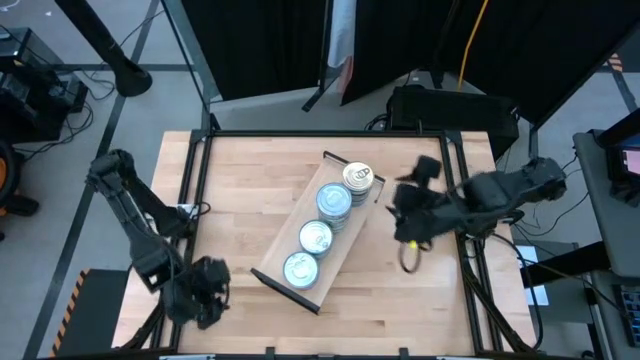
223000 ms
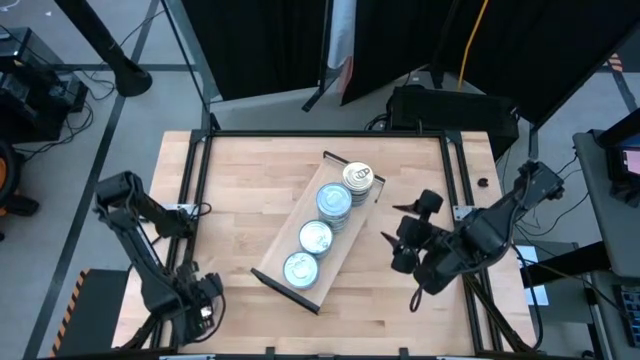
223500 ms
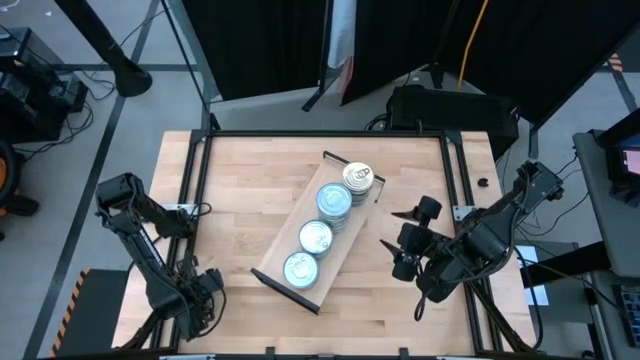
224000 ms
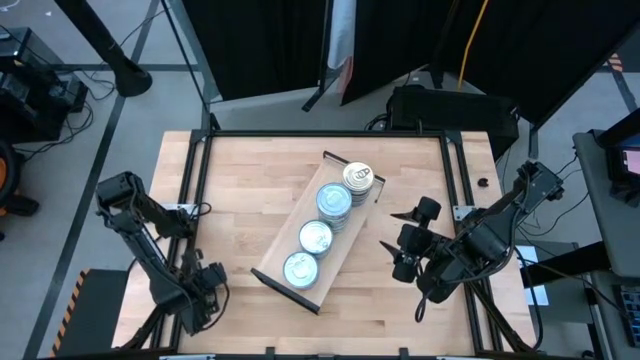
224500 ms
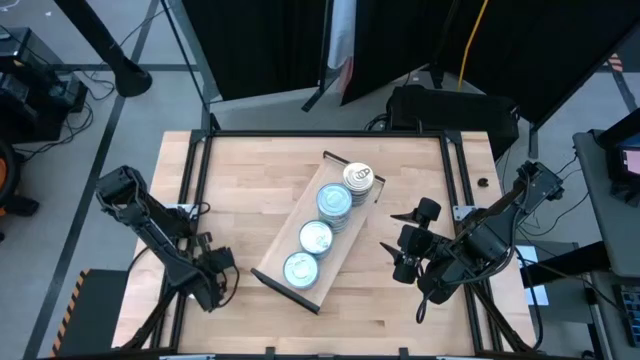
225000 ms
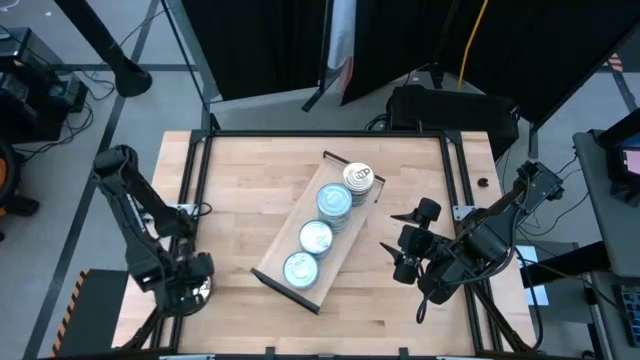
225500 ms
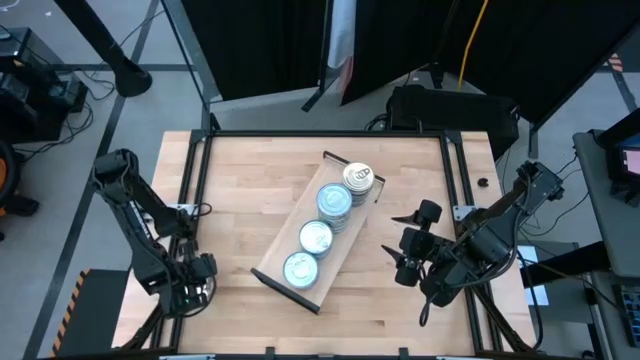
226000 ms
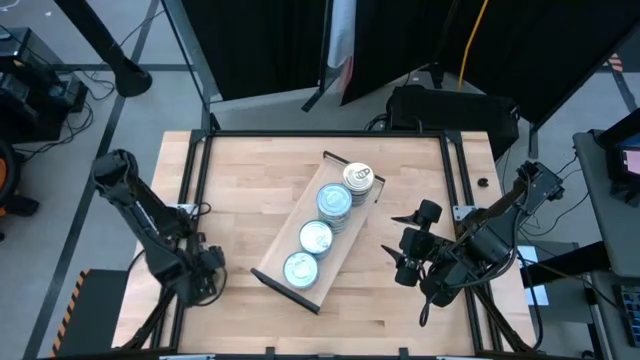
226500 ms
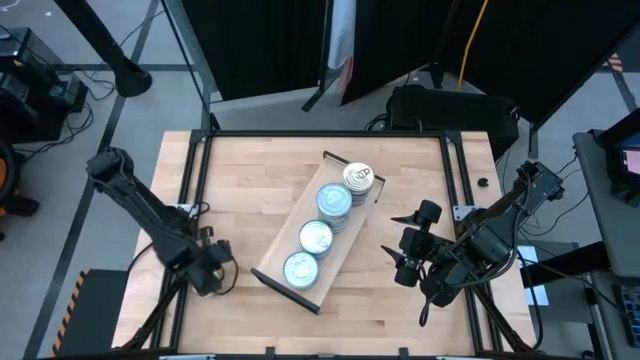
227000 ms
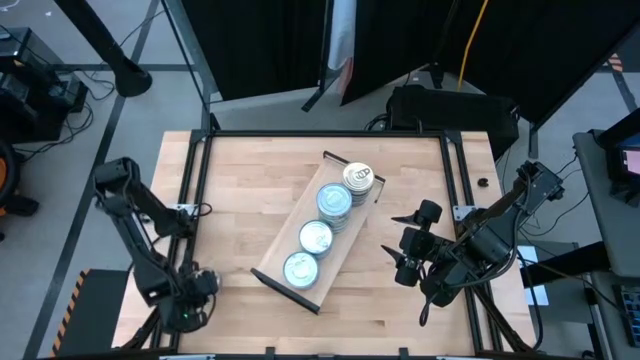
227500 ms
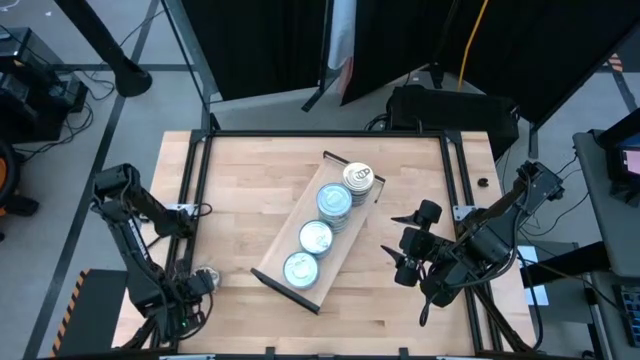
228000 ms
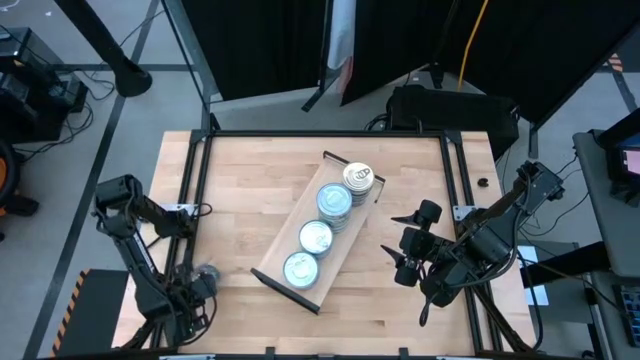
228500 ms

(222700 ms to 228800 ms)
Task: Stack canned seafood by type on shelf
Stack the blue-pink tuna can on top of the other blue-pink tuna can

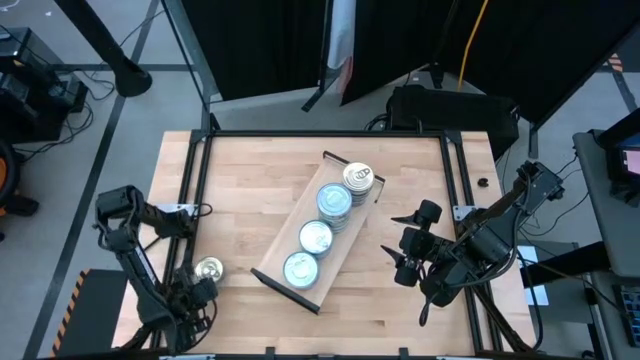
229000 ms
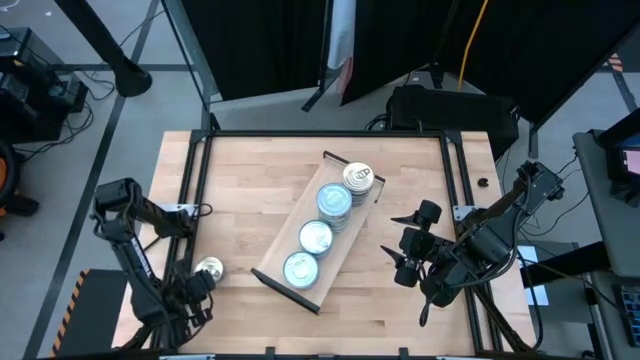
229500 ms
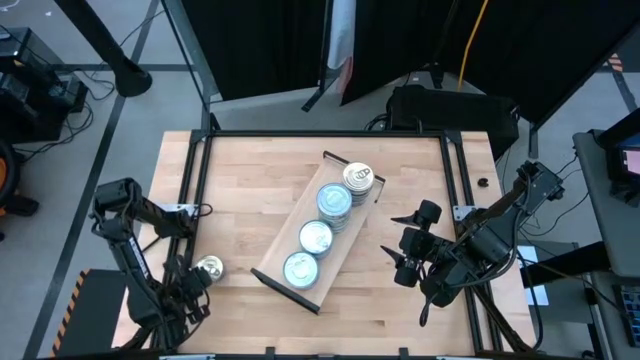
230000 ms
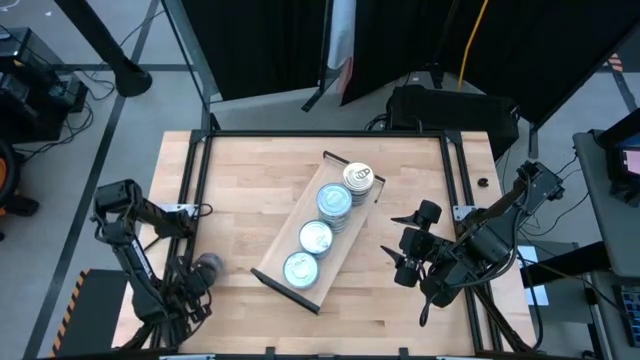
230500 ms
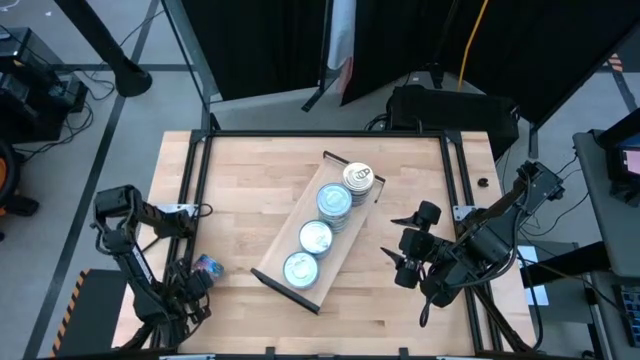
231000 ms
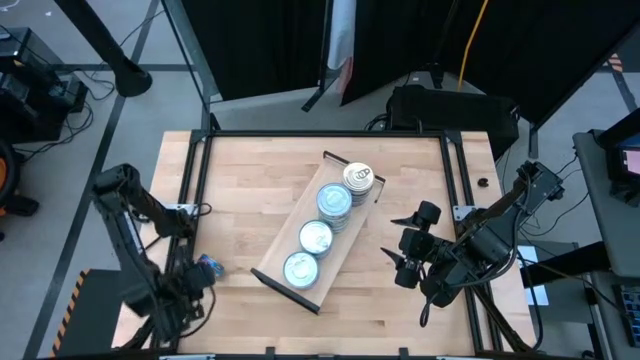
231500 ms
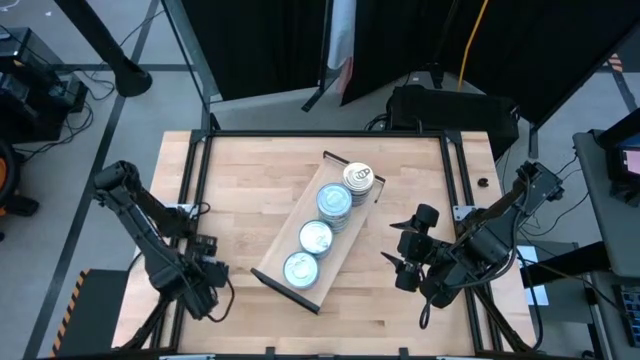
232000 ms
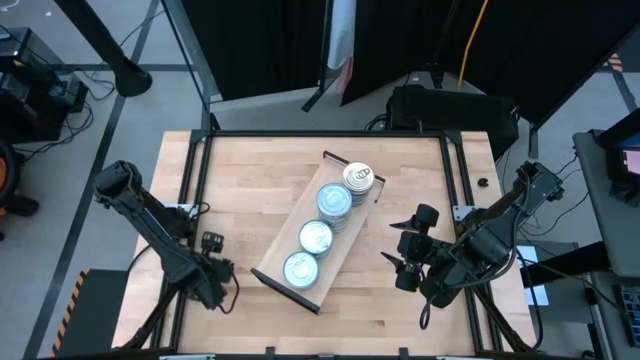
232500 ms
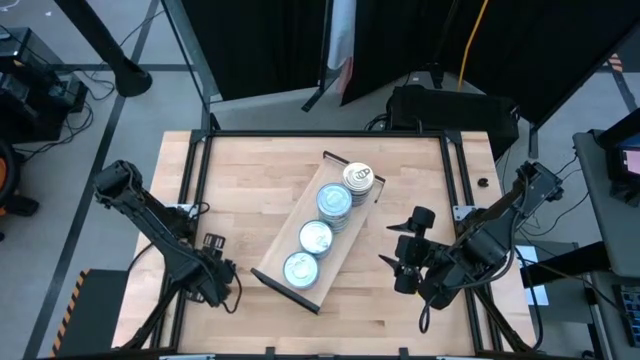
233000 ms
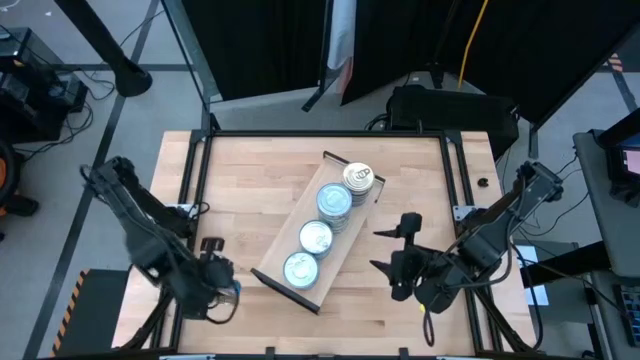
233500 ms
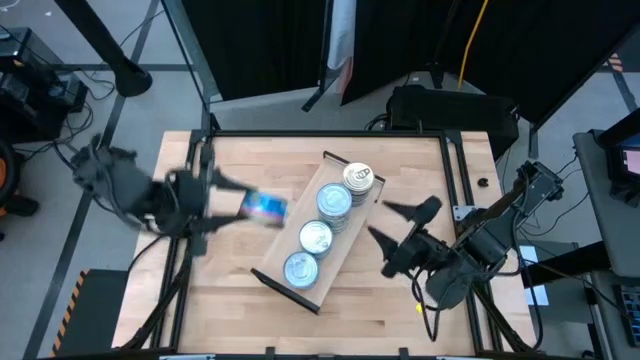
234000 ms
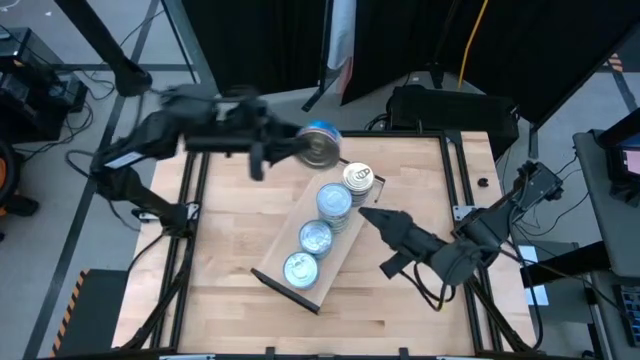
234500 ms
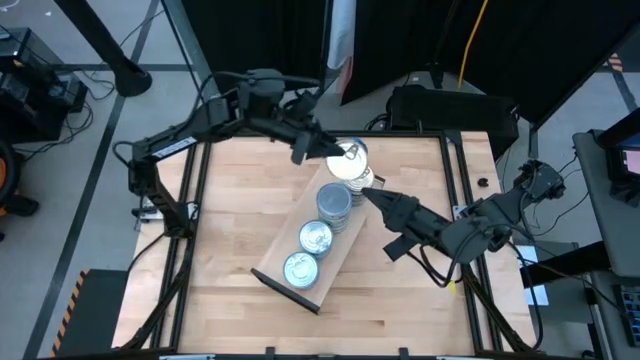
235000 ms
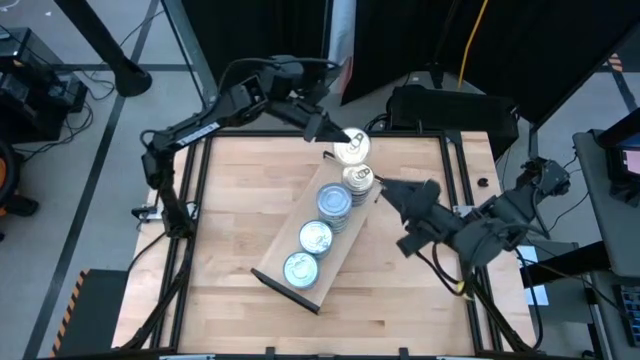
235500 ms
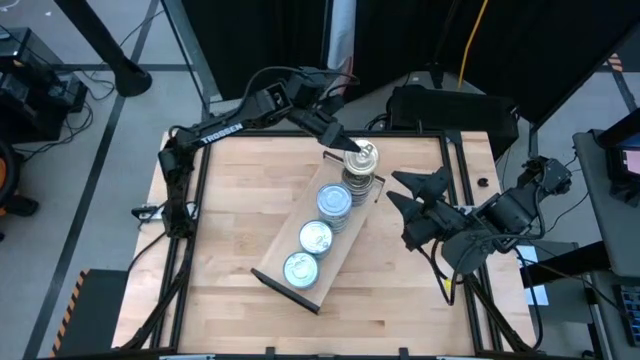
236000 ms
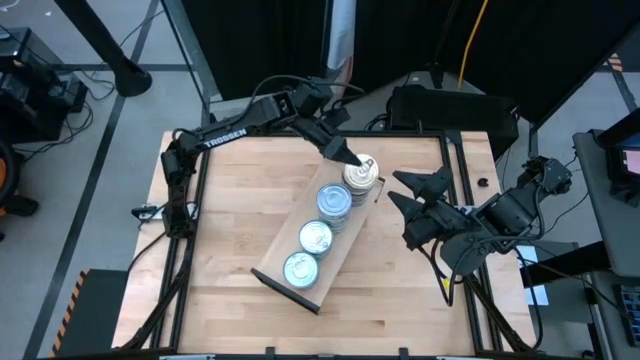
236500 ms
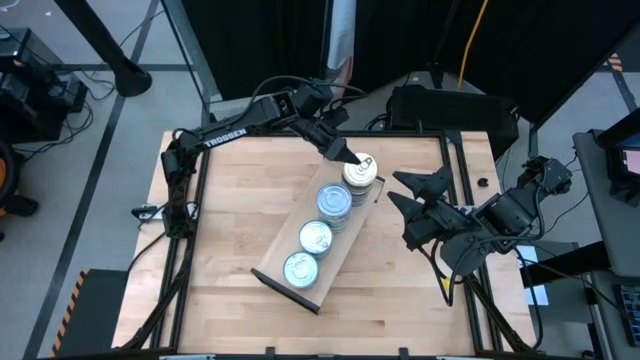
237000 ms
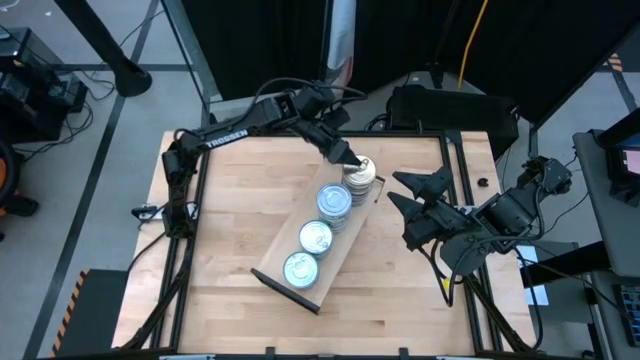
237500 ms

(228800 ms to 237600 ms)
Stack the blue-pink tuna can on top of the other blue-pink tuna can

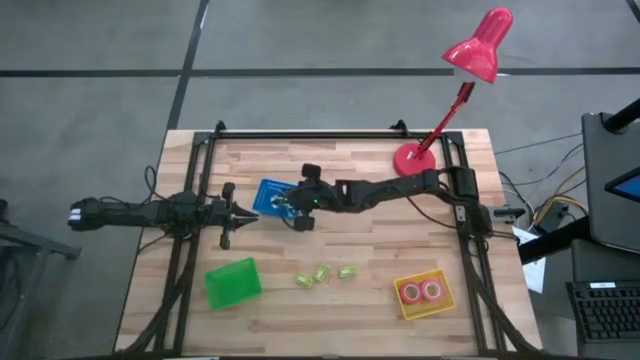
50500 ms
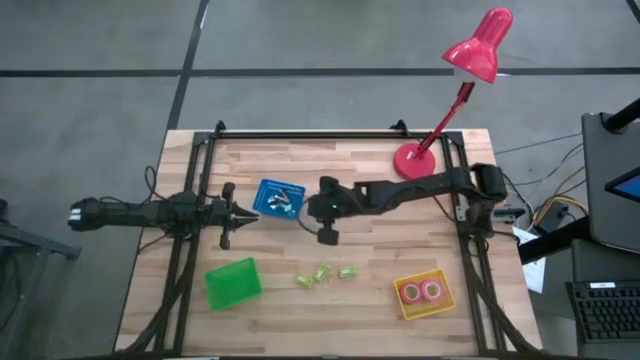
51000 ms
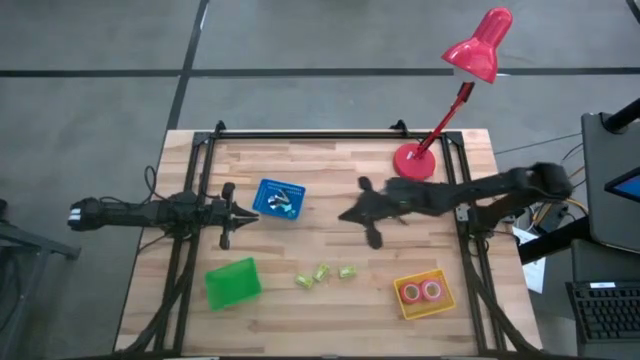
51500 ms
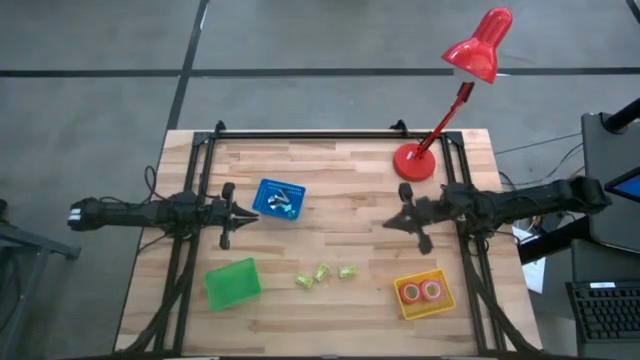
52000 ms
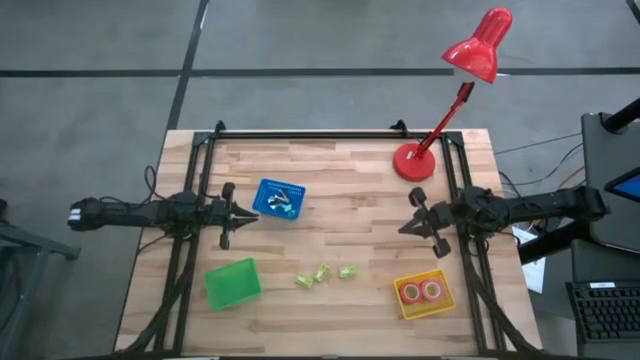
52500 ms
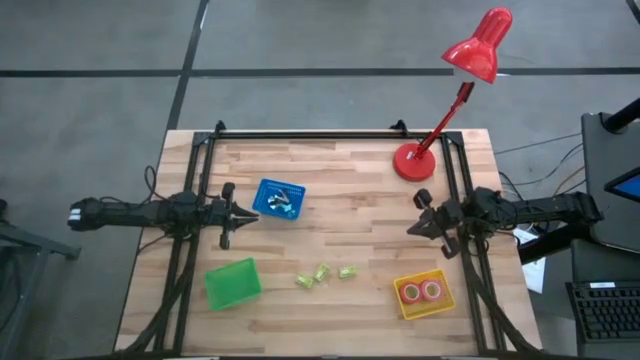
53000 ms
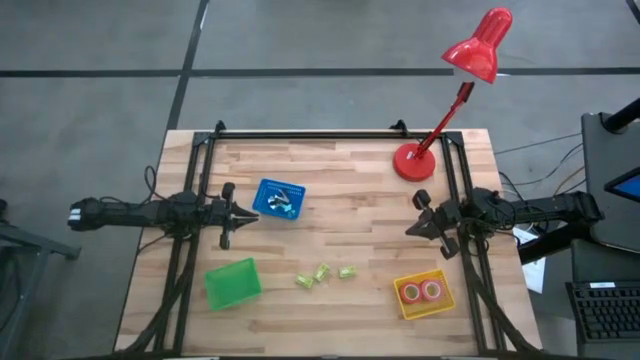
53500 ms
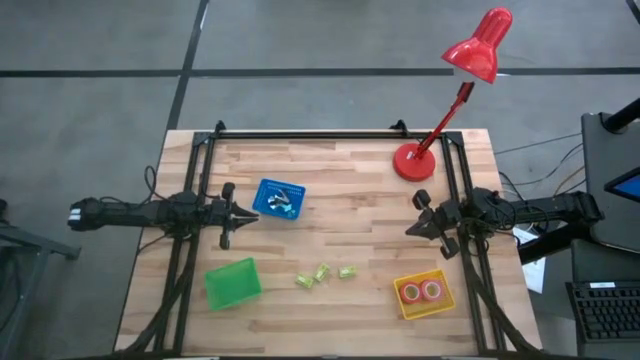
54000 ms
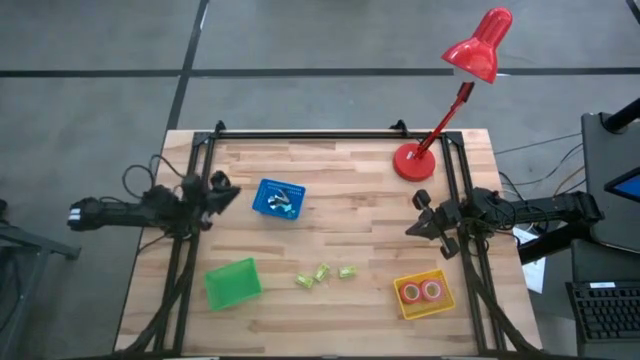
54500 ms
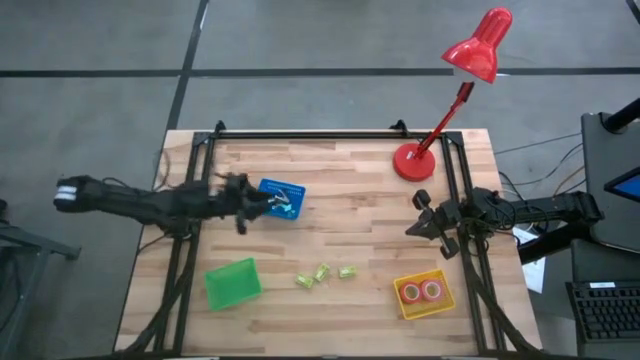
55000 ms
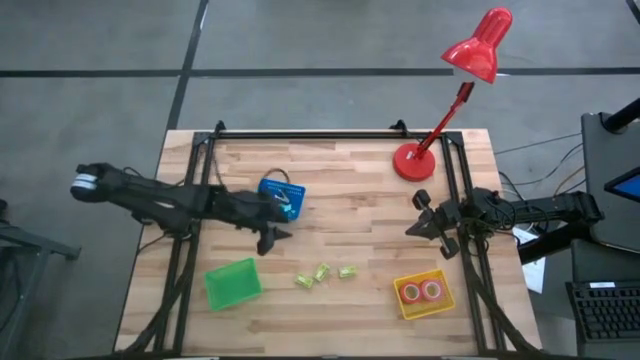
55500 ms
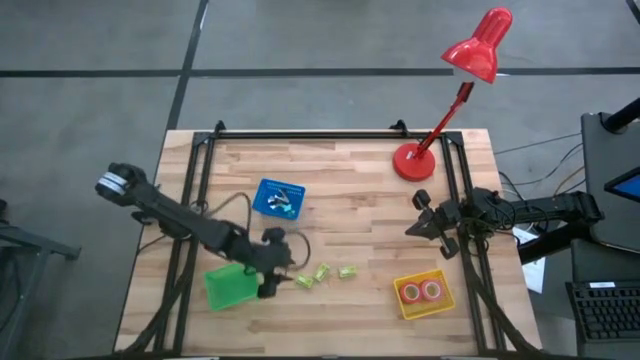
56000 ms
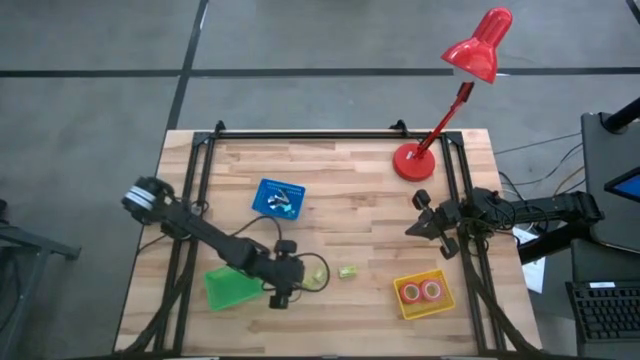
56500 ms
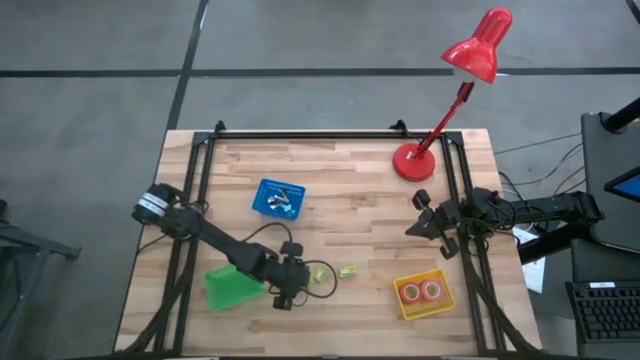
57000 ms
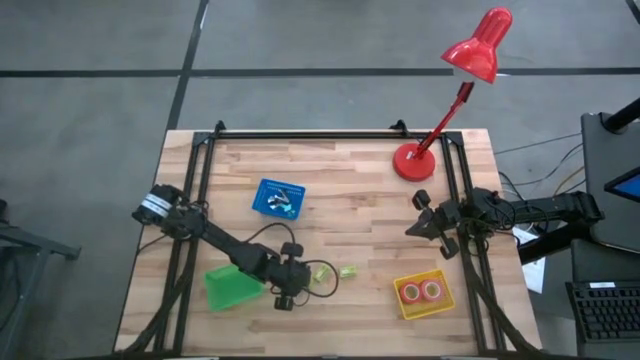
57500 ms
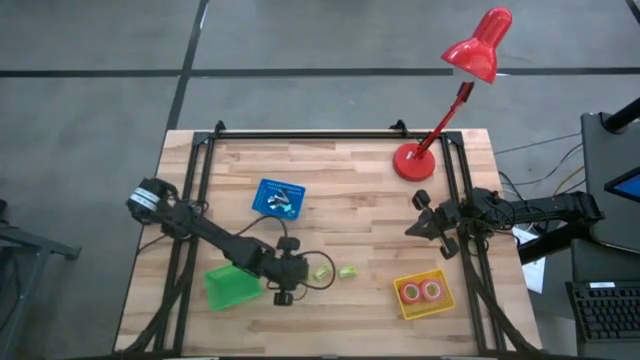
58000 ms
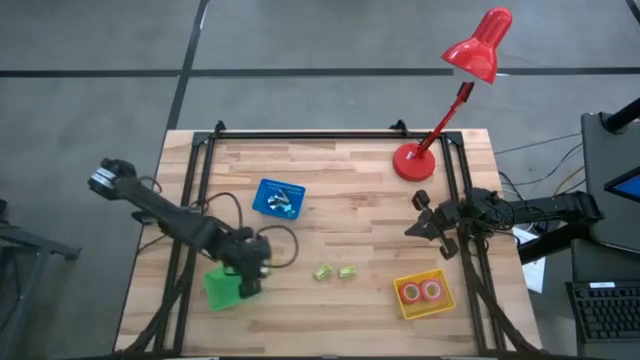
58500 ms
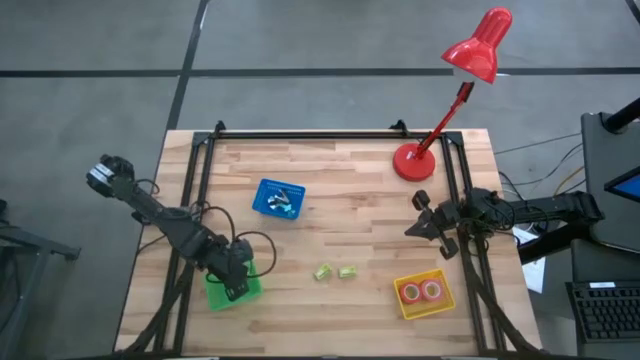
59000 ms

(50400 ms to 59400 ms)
Task: Pick and place Stapler, Stapler remover, tape
Put the left green staple box into the green bin
